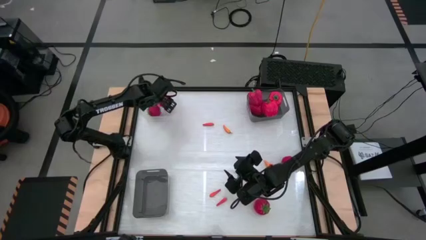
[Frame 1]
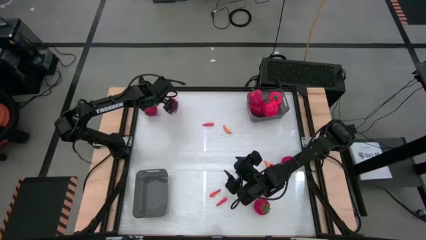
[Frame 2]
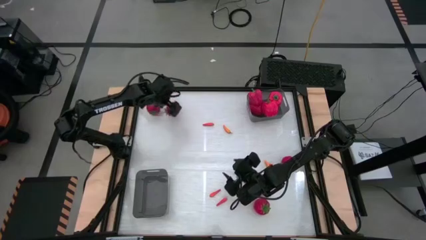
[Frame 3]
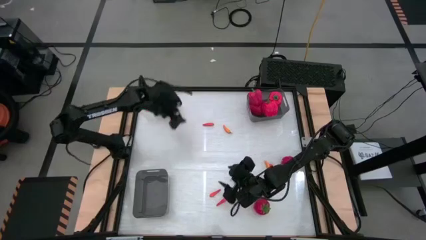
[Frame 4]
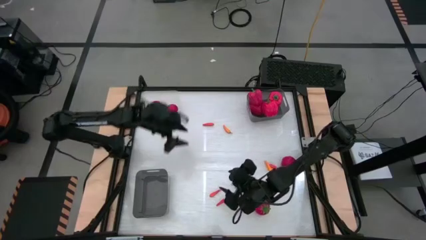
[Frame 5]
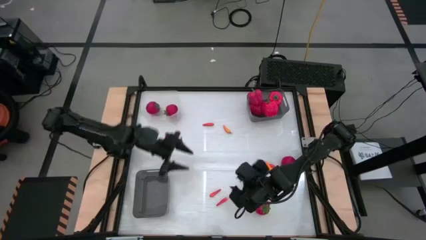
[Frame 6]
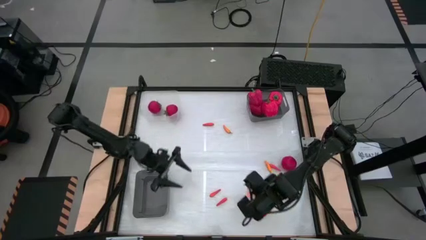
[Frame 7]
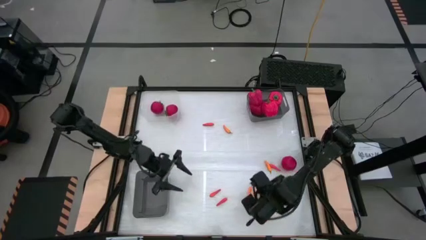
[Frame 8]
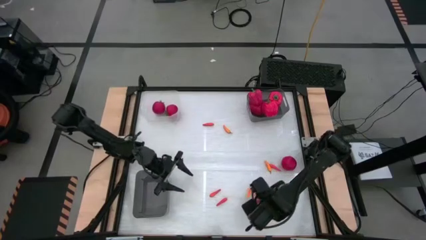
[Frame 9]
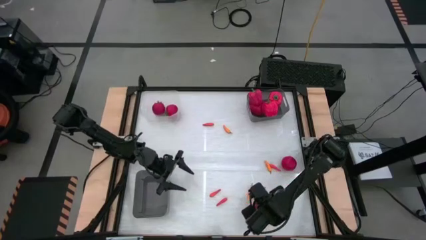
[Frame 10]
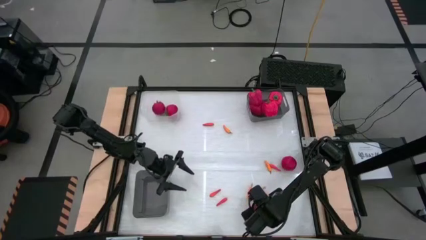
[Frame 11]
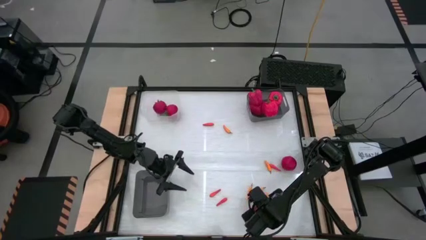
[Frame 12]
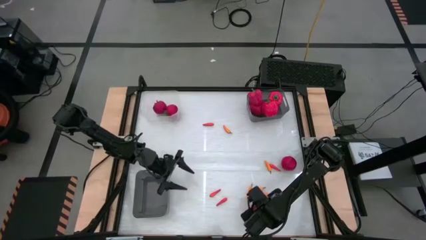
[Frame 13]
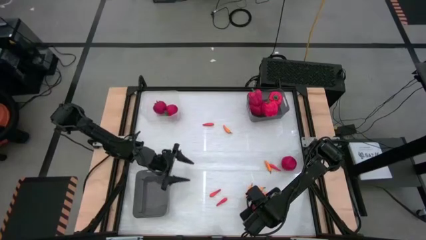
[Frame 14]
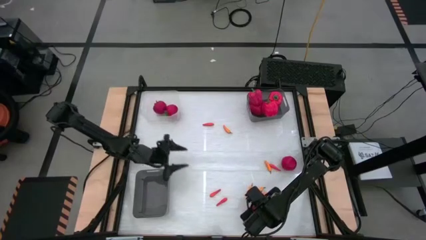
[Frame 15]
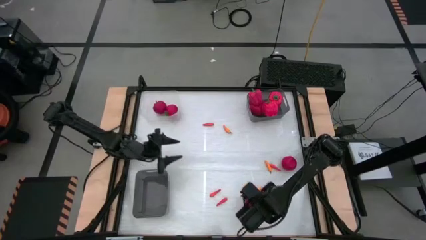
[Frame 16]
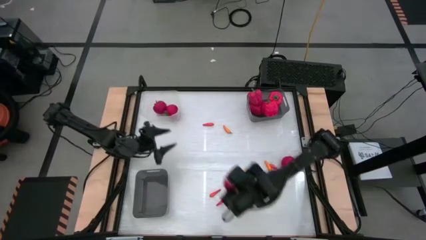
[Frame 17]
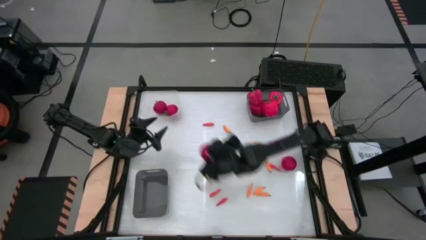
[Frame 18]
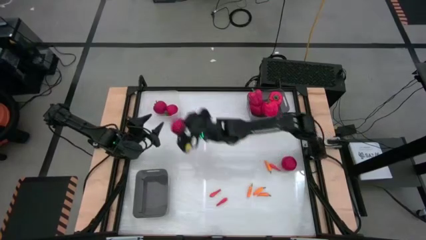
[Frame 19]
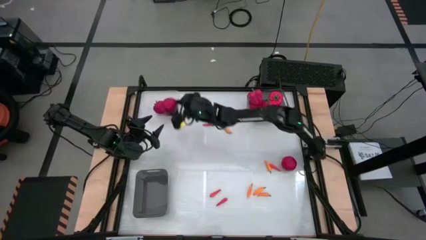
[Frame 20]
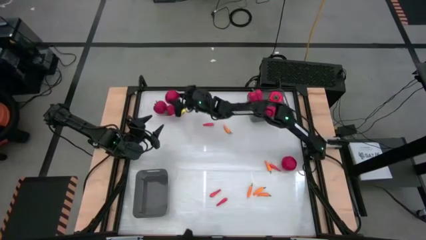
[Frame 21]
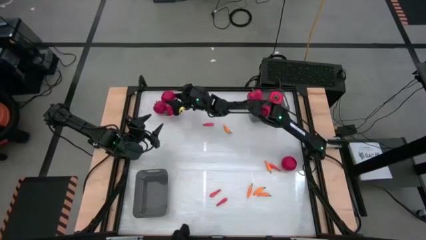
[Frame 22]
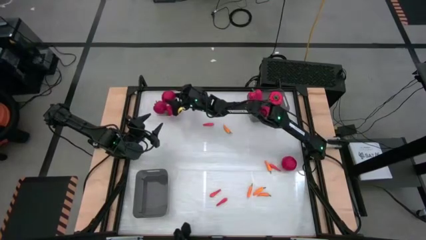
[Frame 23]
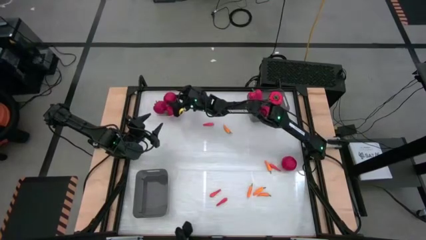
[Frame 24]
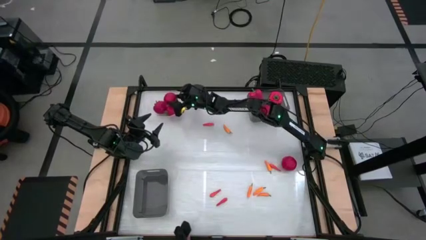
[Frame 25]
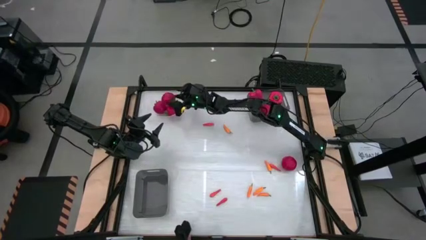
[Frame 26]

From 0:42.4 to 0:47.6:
Task: Sort produce into baskets
Put the red tomato into the transparent bin

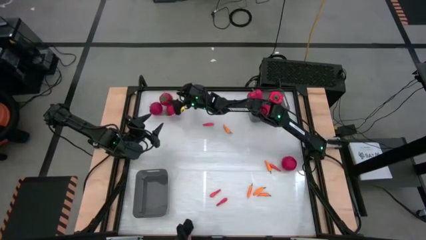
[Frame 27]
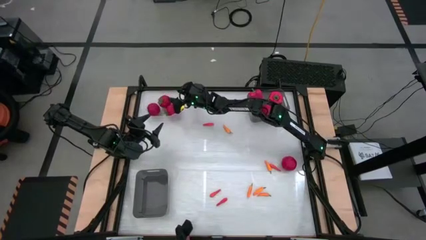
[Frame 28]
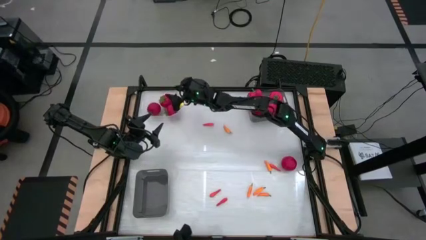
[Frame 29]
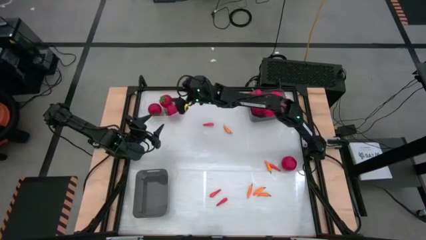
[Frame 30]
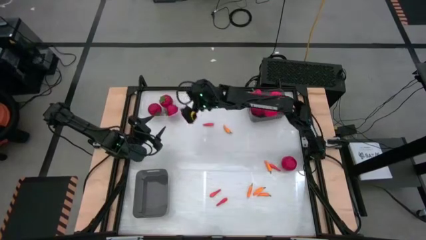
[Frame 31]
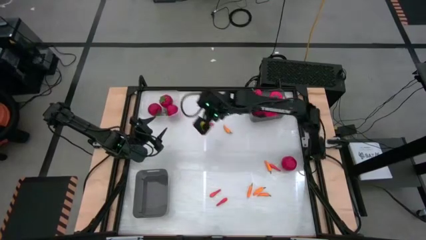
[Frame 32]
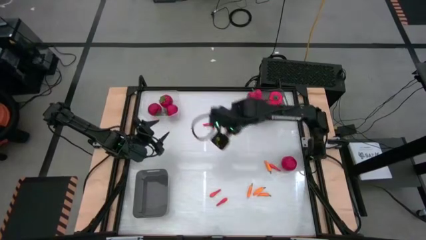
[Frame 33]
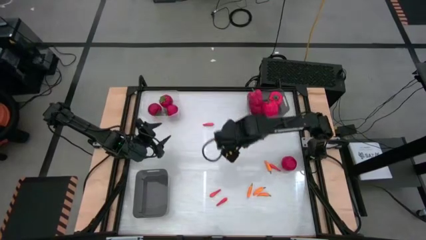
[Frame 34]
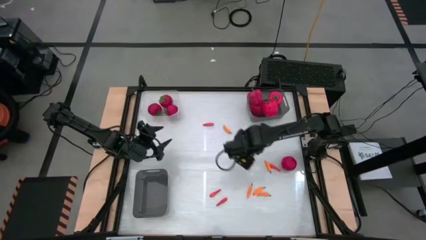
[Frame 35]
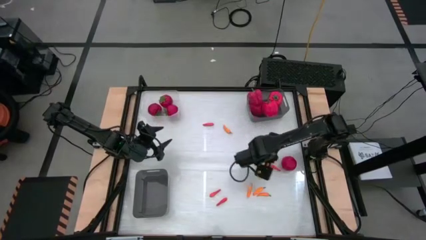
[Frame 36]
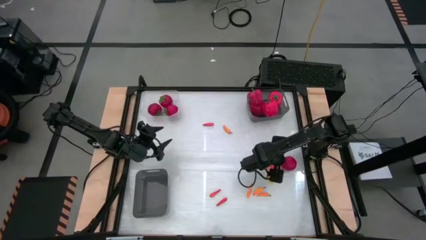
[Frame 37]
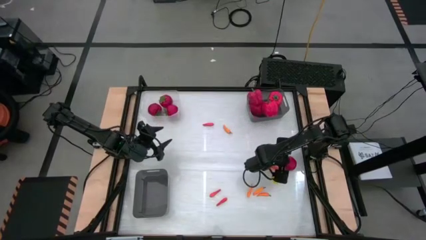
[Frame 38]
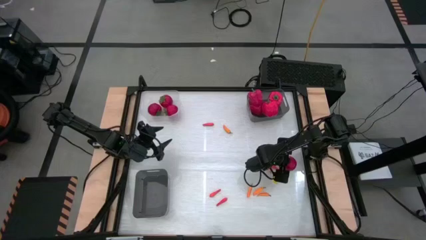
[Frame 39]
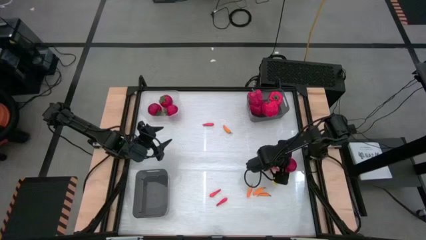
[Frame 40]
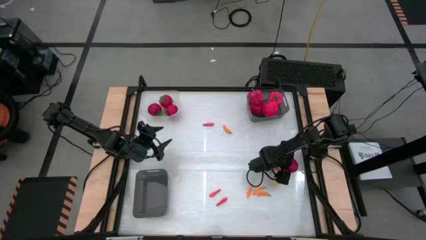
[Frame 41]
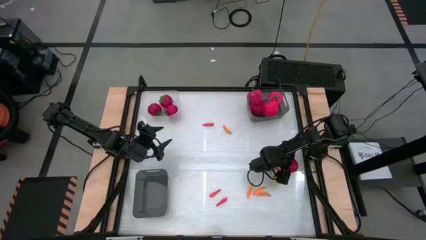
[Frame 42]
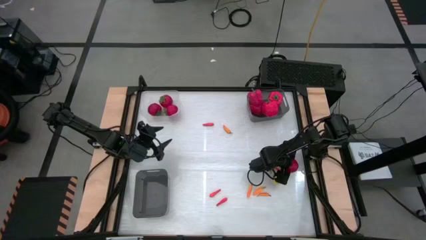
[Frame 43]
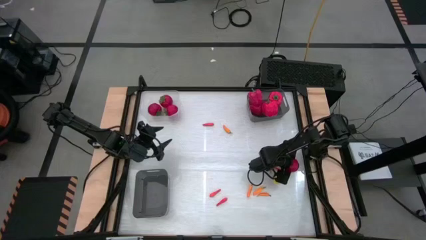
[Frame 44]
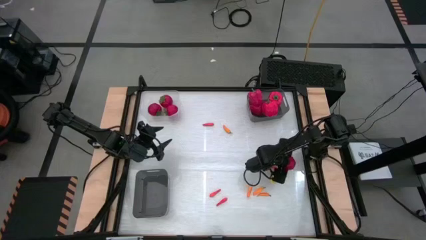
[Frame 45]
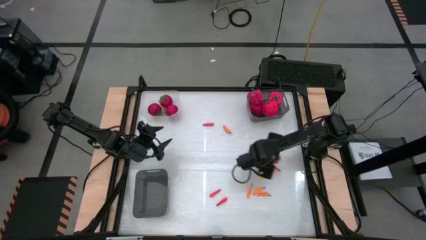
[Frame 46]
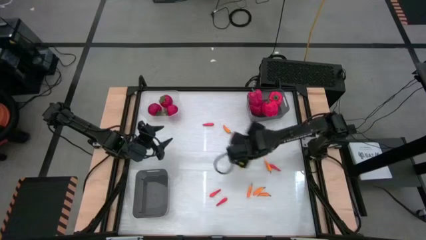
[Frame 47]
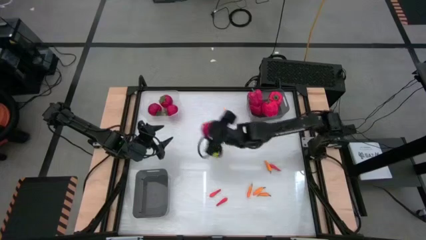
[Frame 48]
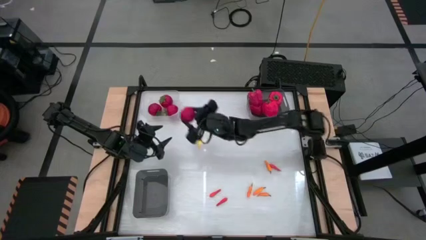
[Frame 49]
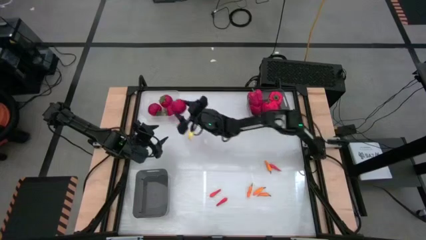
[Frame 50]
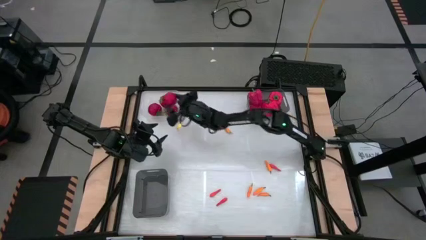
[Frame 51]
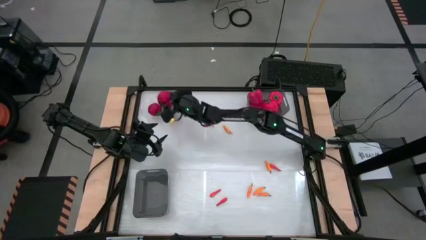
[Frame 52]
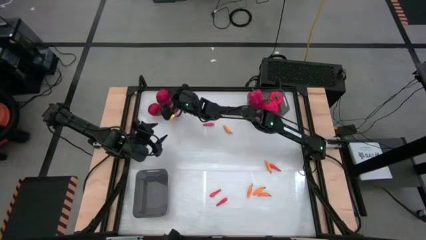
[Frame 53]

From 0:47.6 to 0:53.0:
Put the red tomato into the transparent bin

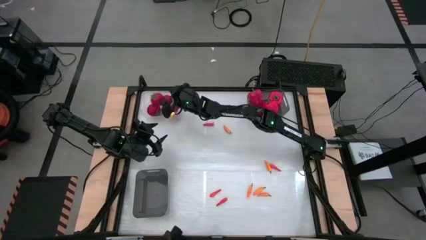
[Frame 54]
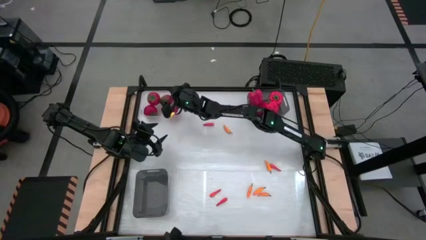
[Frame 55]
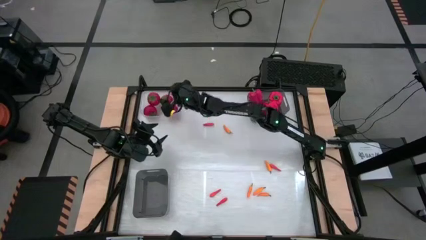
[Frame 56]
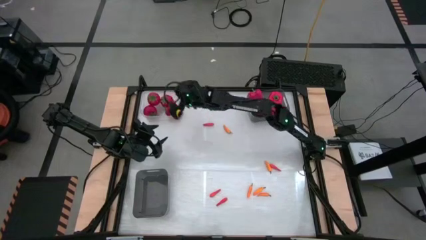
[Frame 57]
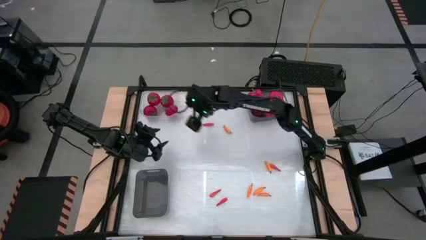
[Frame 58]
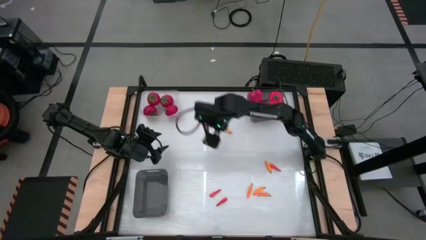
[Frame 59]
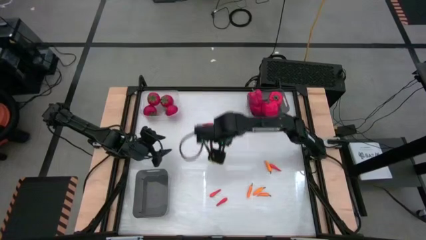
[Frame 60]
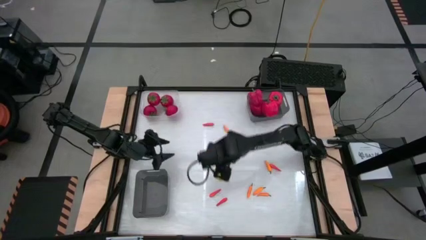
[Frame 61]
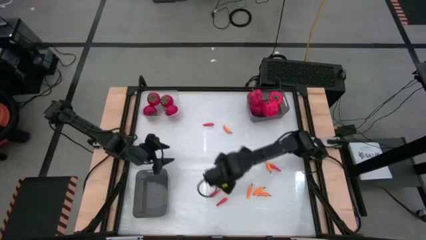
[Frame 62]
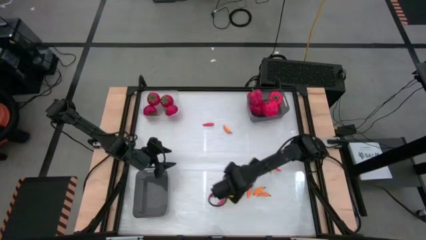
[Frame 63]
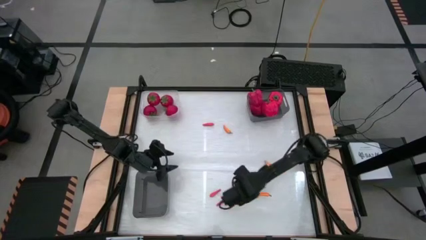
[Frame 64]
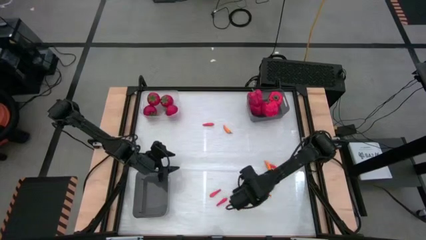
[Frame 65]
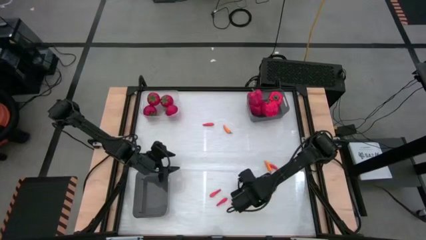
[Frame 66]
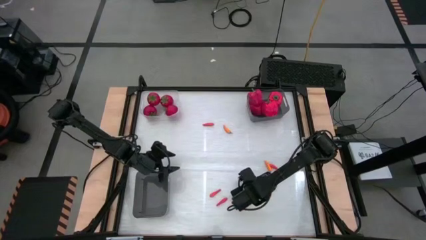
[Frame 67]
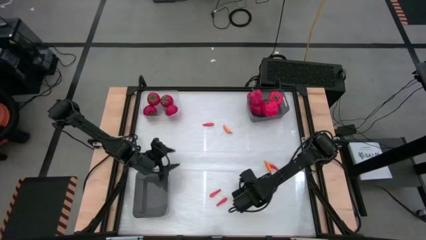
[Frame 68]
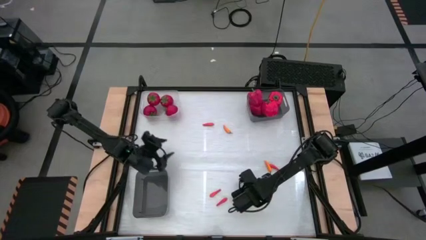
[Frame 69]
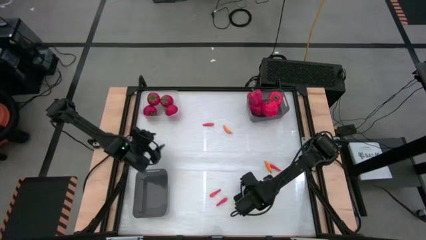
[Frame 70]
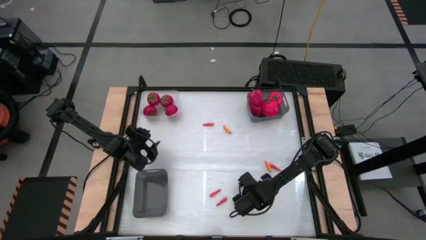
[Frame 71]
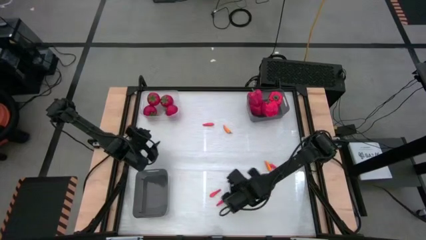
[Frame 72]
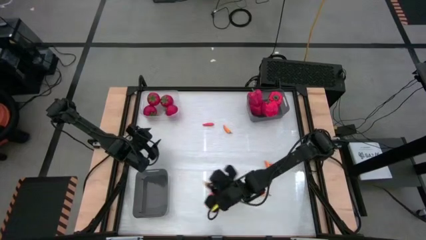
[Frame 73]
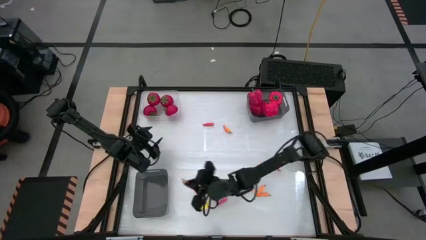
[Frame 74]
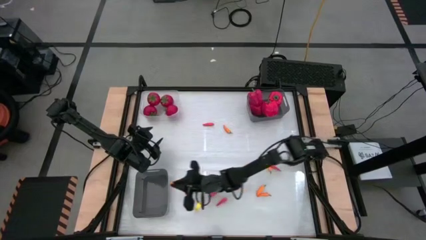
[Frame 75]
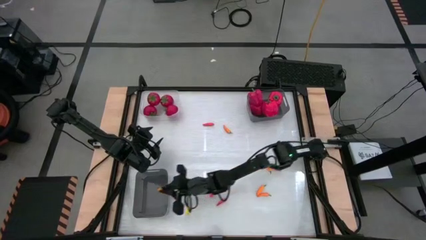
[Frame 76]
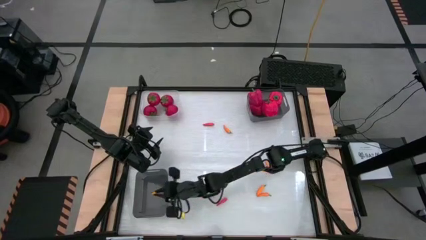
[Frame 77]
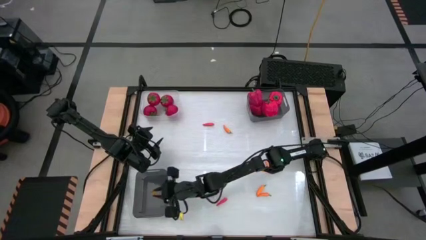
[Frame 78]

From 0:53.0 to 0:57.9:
Put the yellow chili pepper into the bottom black bin

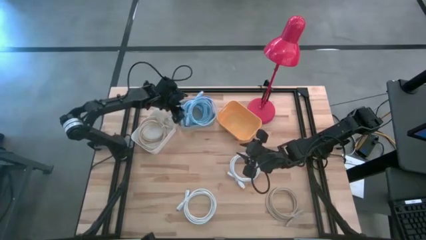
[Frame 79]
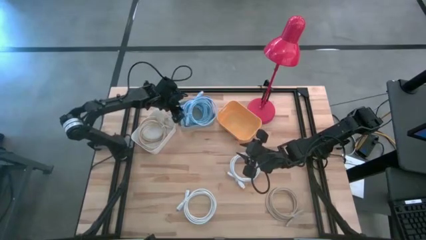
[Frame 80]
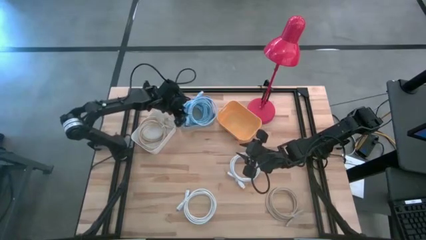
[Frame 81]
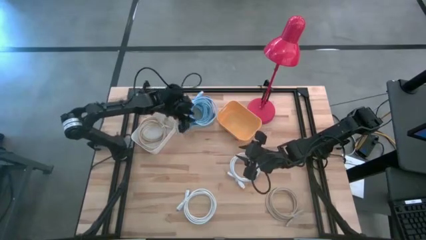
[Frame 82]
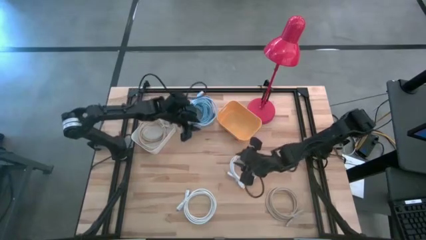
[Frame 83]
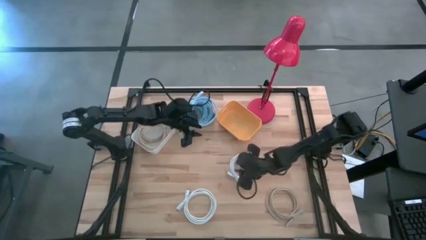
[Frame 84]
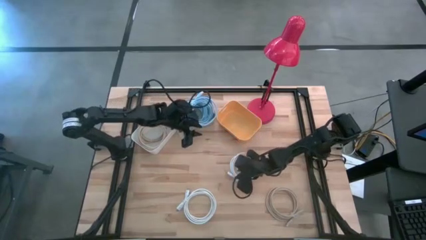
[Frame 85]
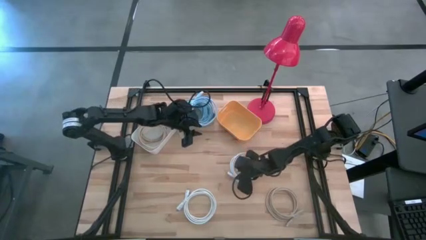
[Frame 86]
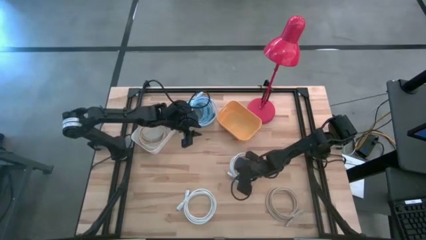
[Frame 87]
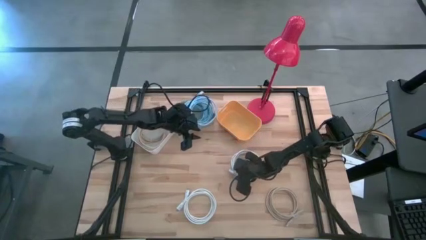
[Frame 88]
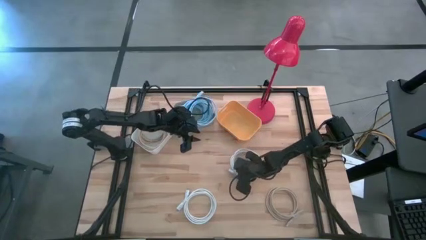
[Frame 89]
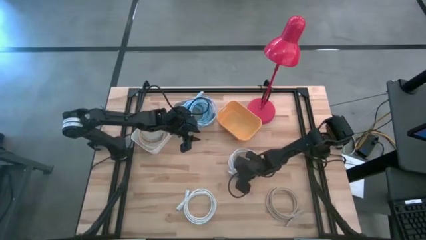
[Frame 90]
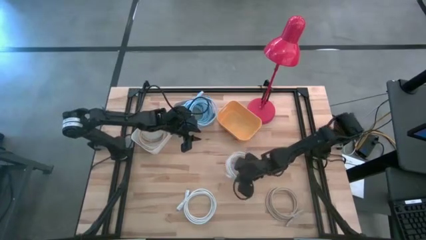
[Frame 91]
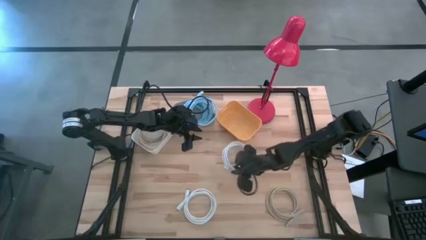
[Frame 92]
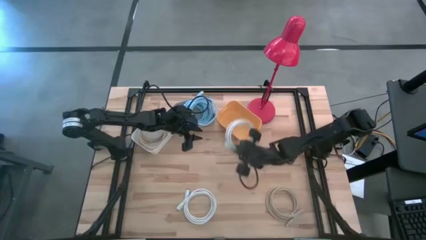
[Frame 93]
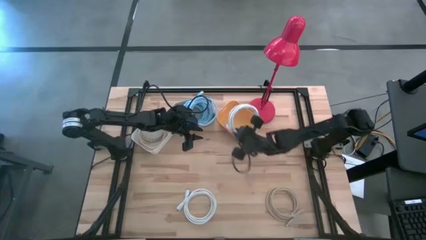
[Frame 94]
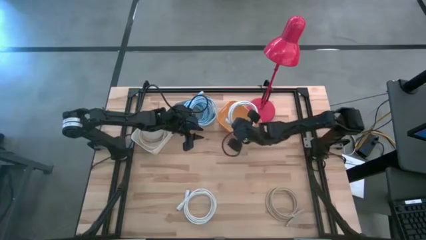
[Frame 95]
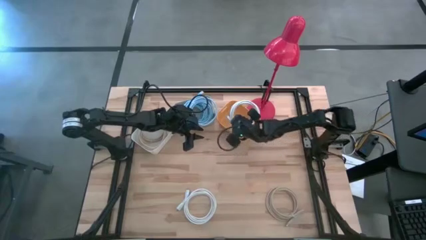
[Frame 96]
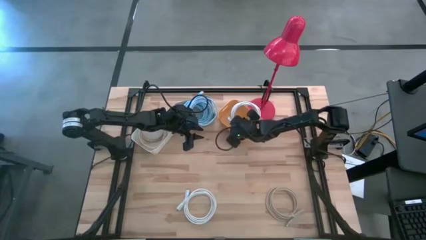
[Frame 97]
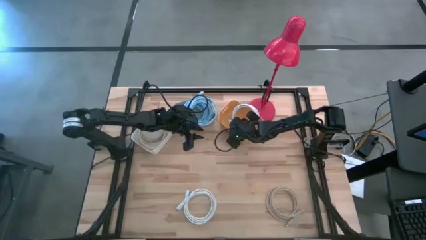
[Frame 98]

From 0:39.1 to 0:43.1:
Task: Sort HDMI cables
Put the right white hdmi cable into the yellow bin
